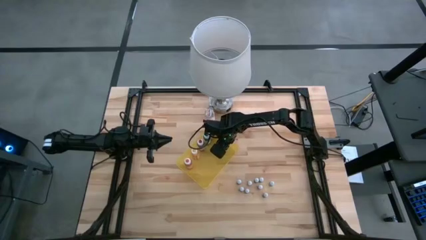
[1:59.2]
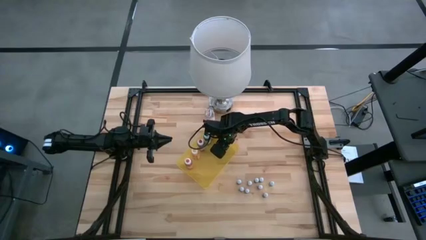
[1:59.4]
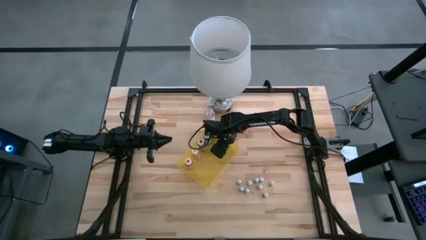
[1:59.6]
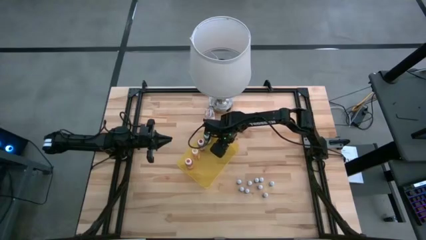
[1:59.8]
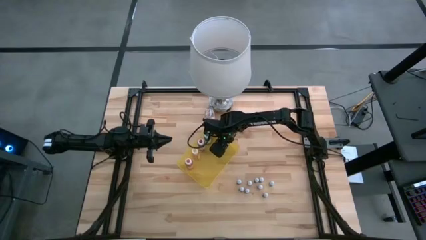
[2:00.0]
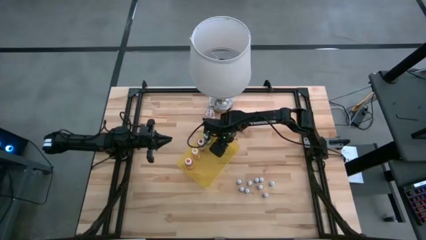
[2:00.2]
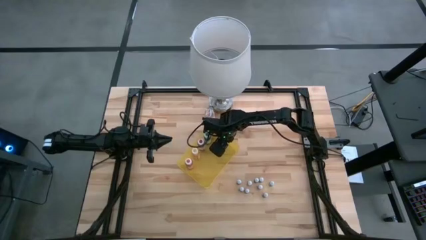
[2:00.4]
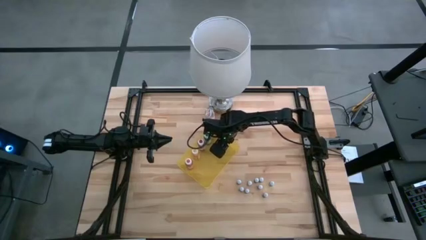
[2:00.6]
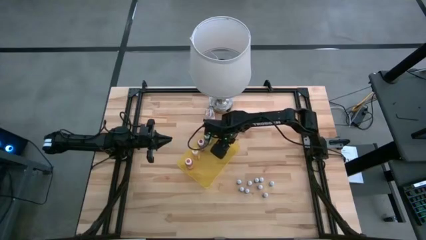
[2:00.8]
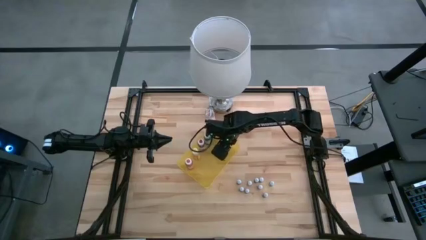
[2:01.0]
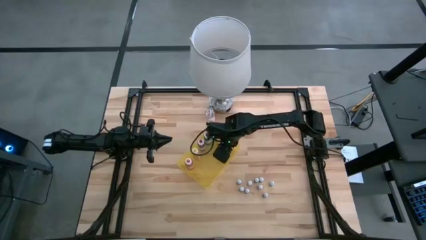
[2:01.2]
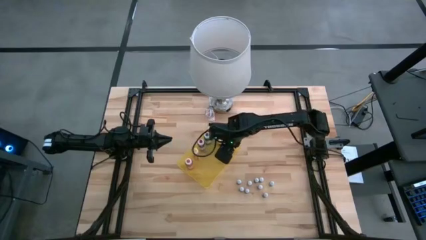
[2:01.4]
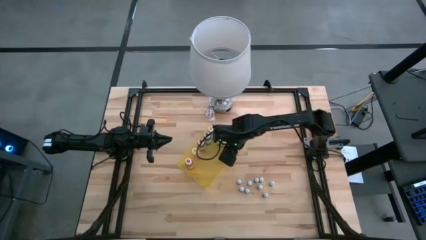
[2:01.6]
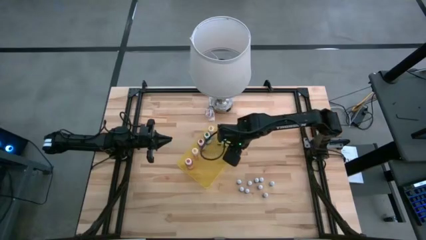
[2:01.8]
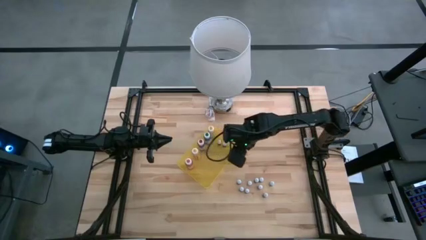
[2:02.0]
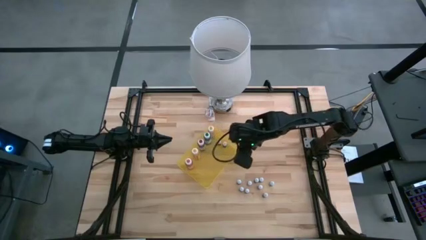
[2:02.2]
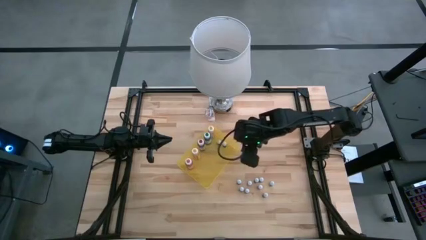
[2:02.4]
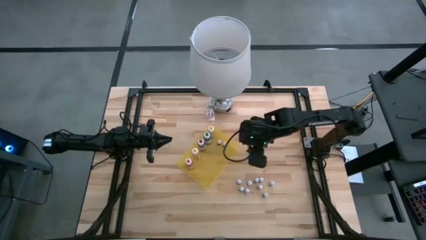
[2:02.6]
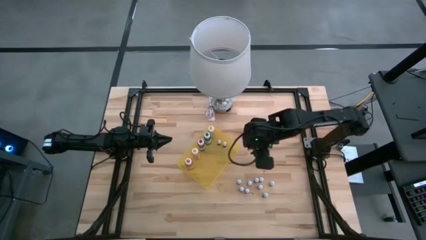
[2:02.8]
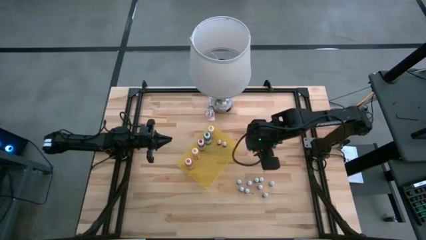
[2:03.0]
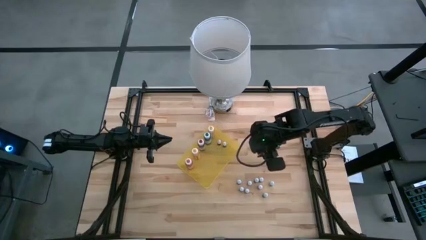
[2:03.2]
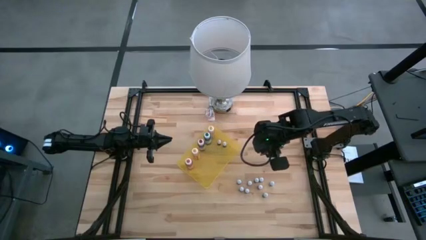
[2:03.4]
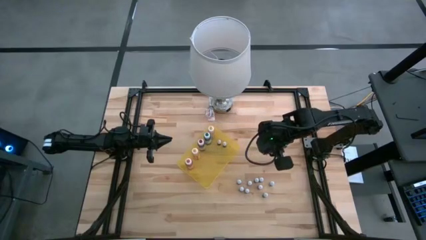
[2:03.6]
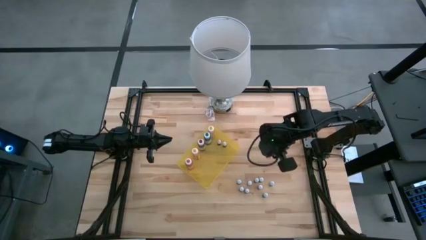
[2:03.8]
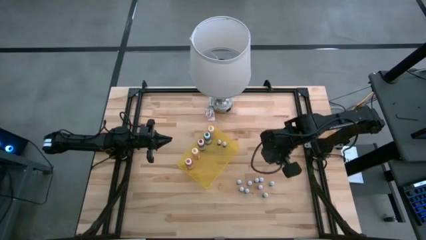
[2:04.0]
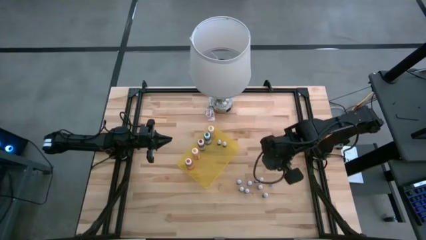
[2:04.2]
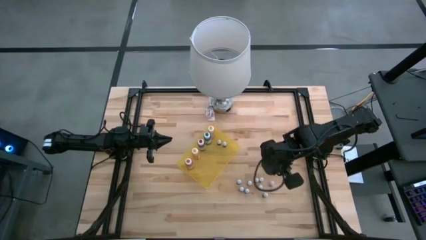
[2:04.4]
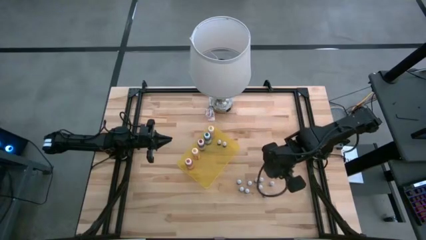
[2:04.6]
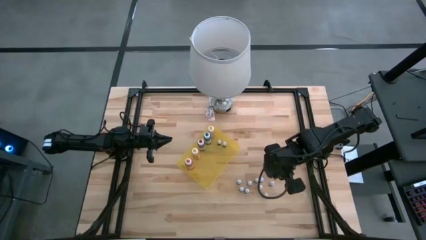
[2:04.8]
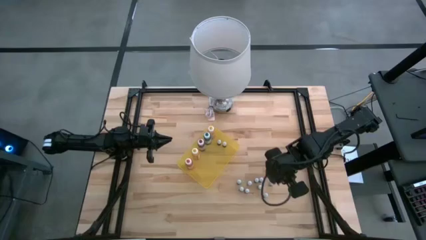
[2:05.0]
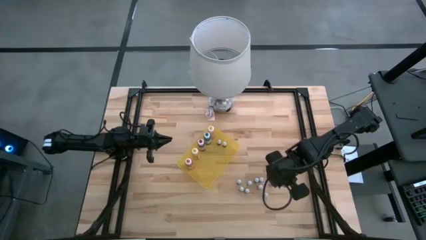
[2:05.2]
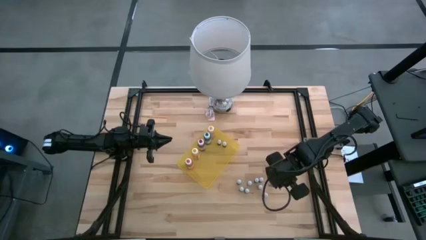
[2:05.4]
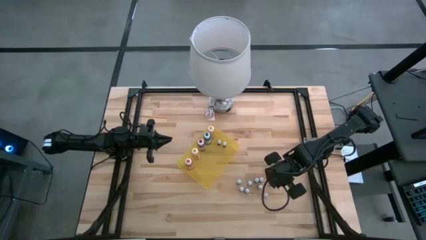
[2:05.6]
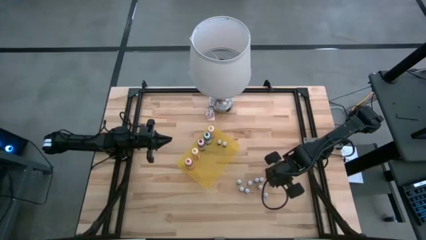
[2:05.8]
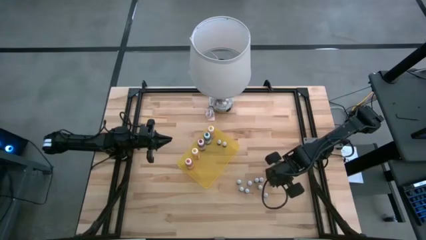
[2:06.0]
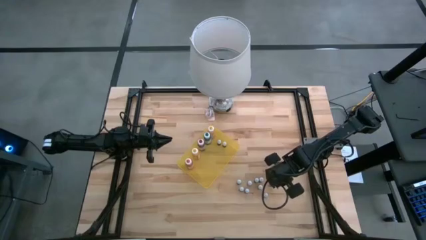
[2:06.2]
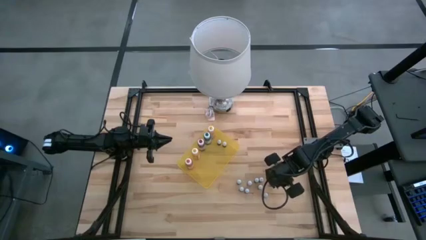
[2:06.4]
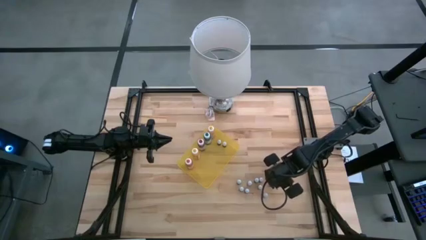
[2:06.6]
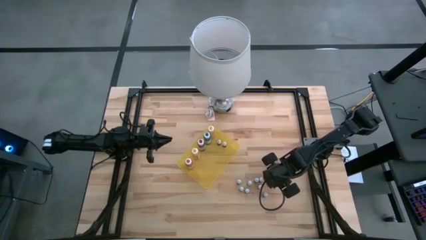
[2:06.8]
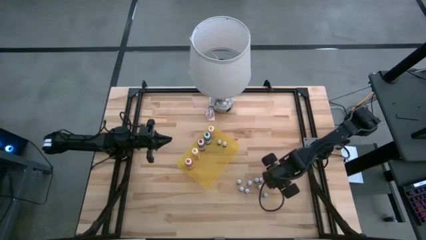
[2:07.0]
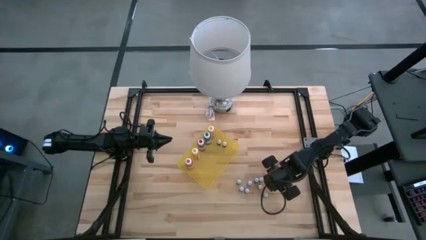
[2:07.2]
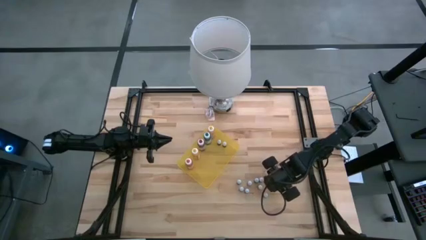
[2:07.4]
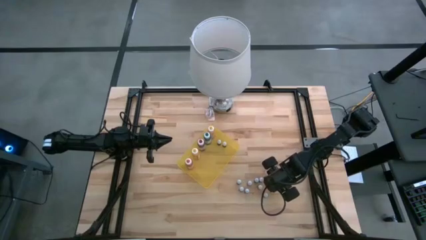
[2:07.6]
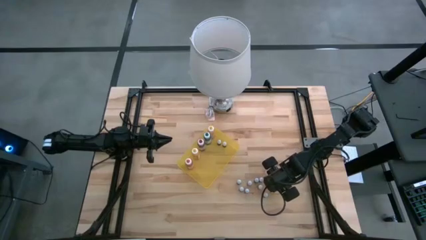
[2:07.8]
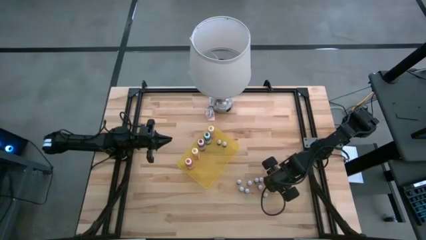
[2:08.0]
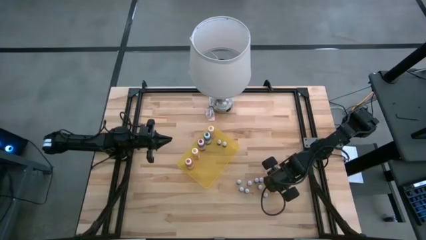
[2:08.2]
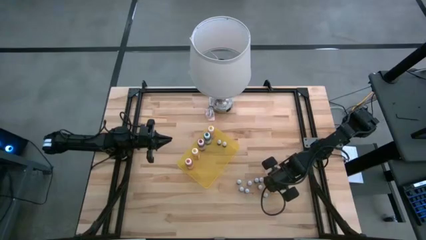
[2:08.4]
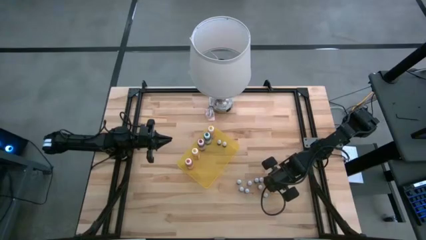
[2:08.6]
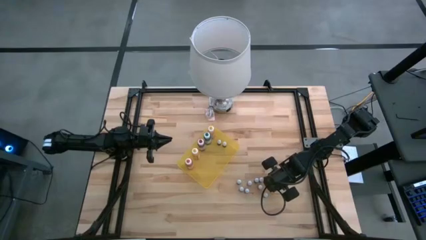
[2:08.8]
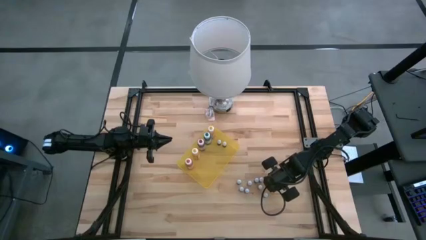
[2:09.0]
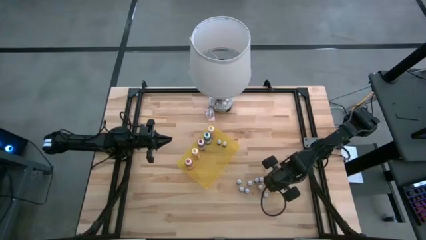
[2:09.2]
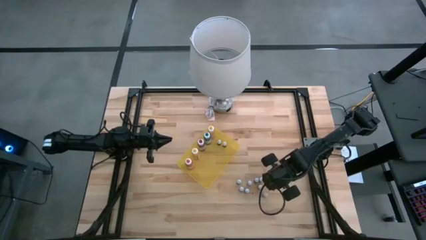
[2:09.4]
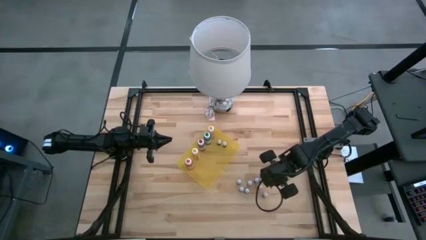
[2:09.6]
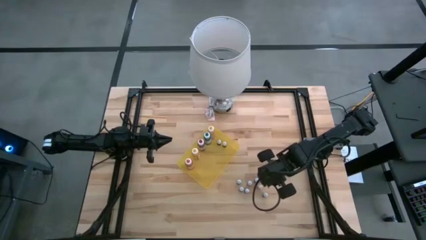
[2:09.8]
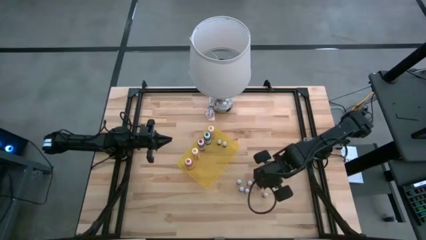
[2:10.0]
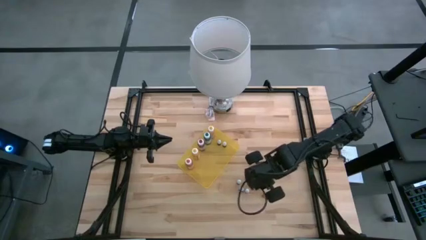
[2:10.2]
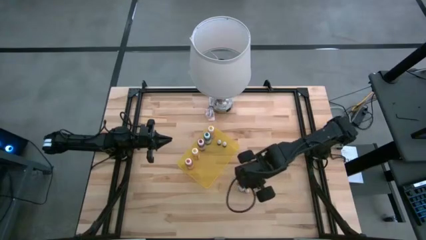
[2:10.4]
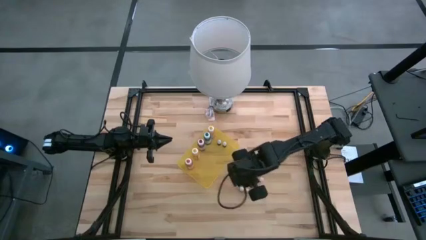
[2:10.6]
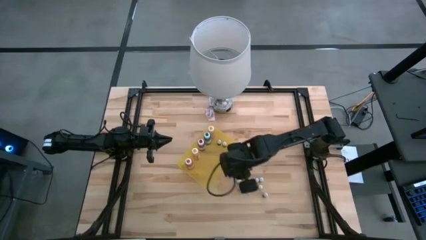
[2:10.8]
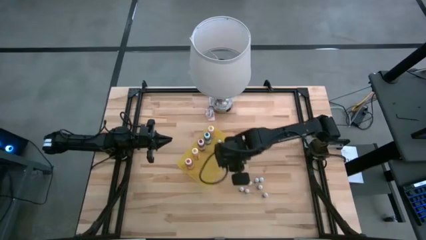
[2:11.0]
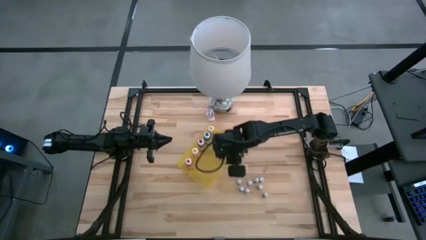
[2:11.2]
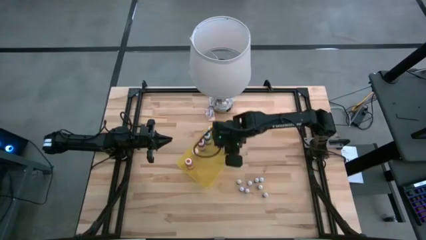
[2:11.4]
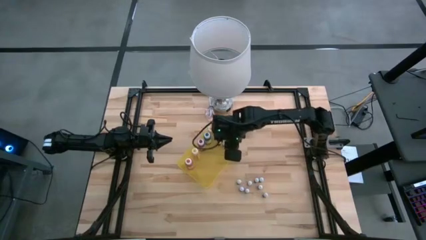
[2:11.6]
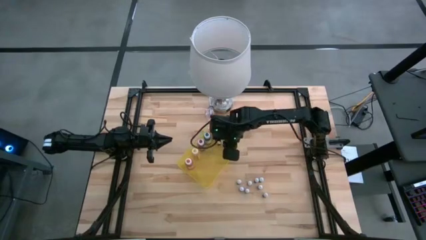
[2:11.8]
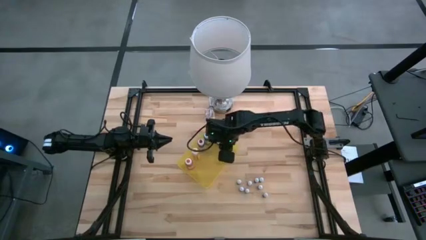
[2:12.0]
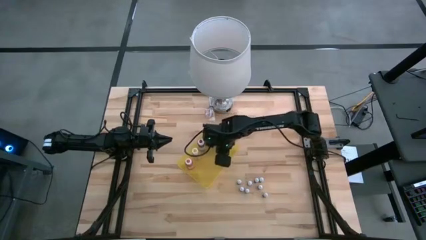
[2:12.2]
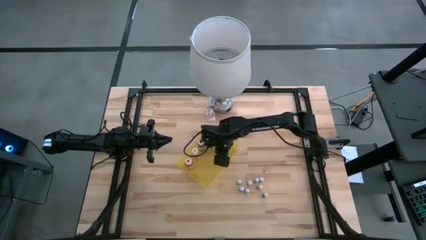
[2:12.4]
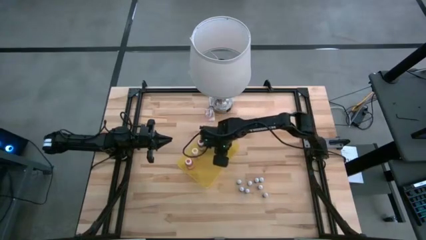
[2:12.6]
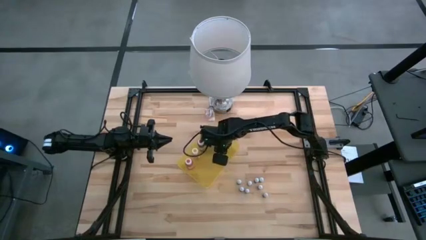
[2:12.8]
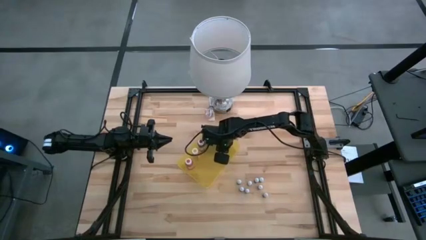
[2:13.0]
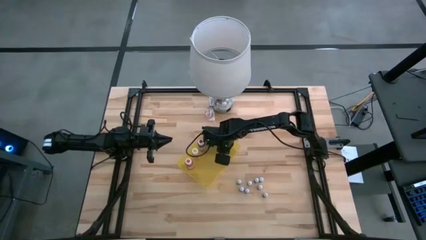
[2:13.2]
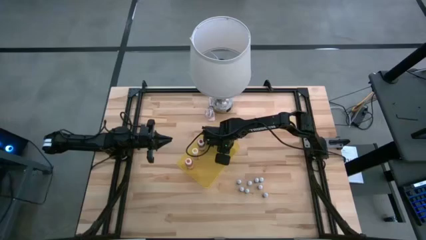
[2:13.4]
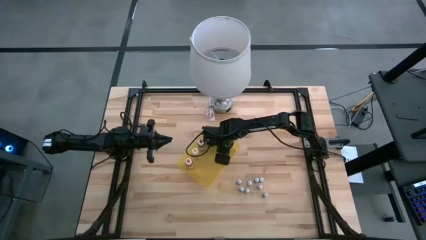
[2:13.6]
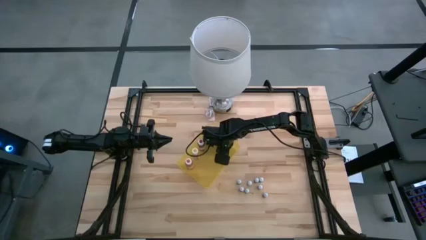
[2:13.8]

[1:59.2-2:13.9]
Task: Pick & Place food coloring
Put the small right black food coloring bottle into the yellow bin

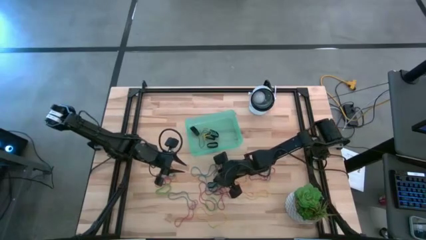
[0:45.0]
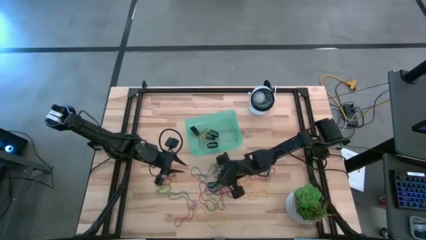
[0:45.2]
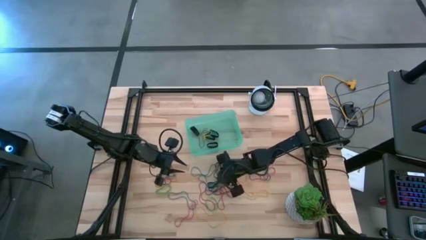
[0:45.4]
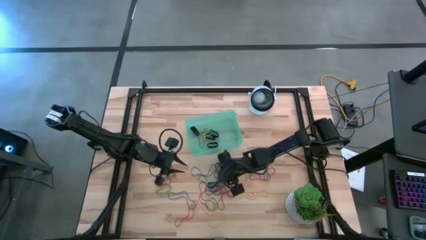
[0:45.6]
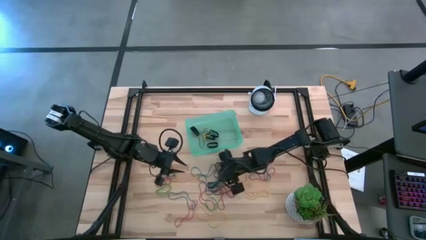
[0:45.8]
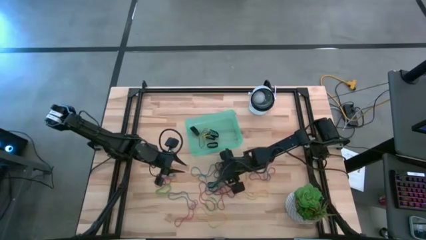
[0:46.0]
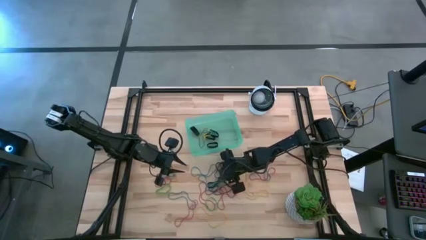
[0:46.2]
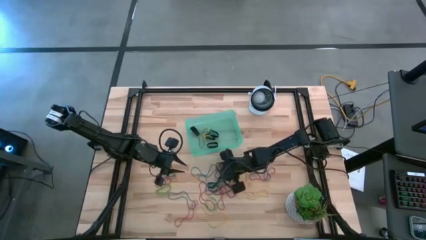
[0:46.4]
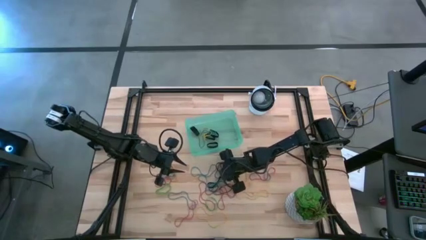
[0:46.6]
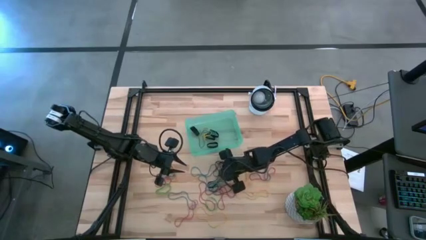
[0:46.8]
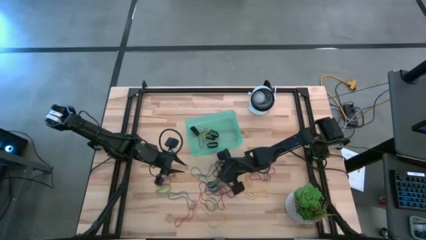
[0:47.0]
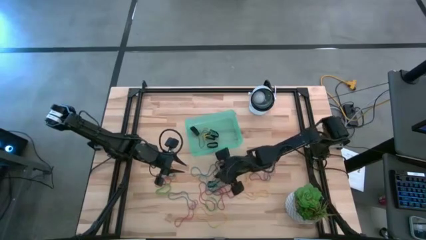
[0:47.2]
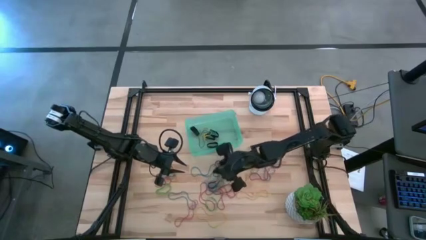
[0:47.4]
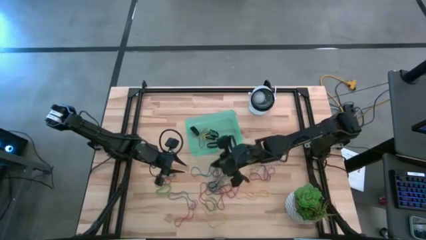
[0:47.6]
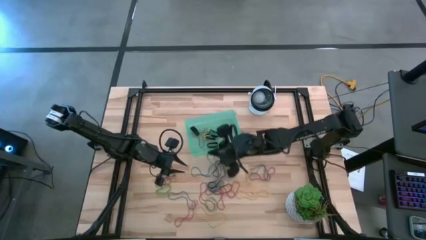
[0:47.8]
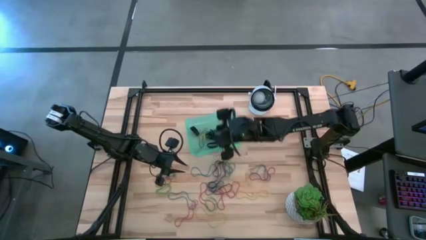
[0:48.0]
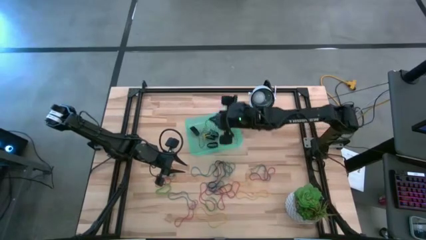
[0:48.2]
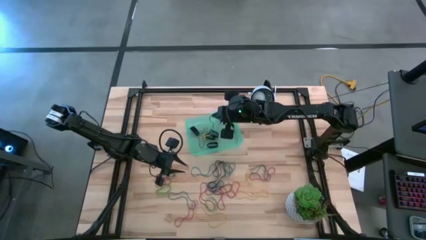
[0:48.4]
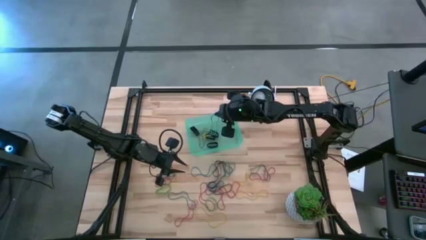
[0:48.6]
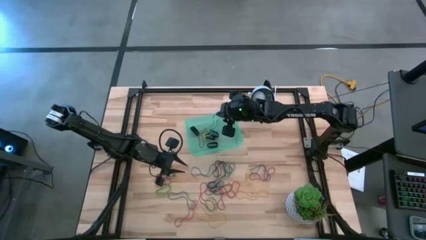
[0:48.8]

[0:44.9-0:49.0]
Task: Pick and place rubber bands into bin
Put the blue rubber band into the green bin
